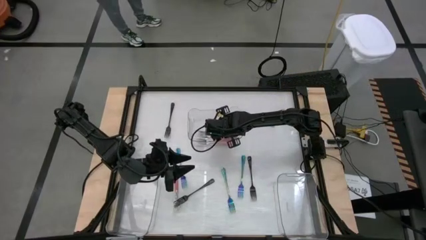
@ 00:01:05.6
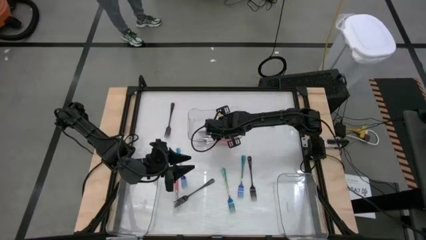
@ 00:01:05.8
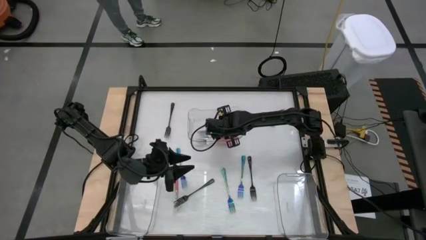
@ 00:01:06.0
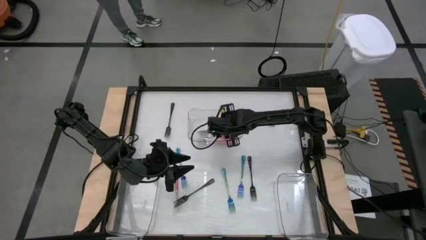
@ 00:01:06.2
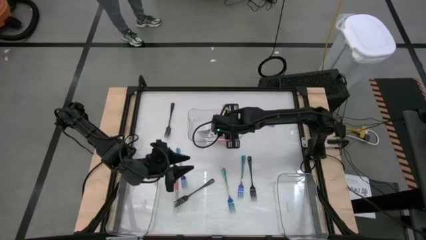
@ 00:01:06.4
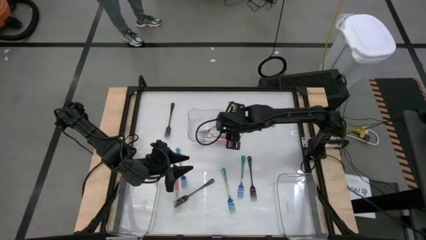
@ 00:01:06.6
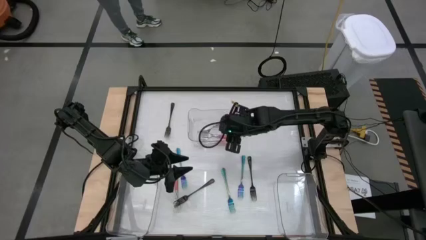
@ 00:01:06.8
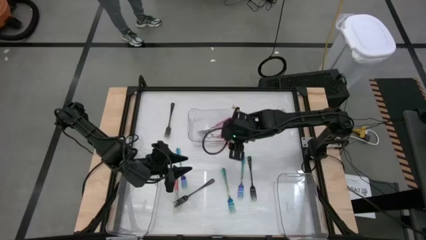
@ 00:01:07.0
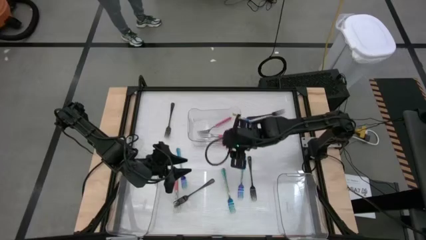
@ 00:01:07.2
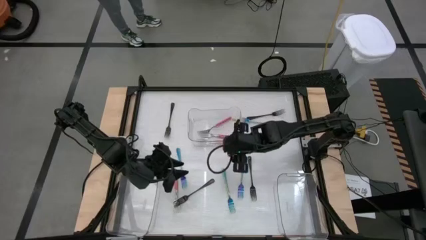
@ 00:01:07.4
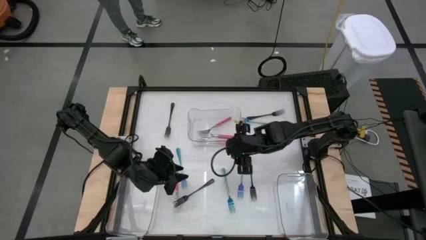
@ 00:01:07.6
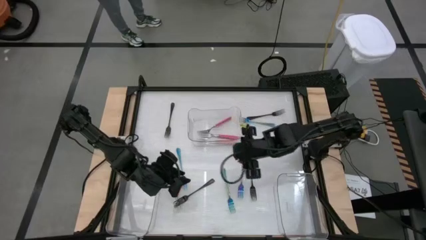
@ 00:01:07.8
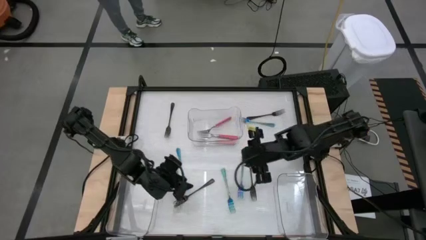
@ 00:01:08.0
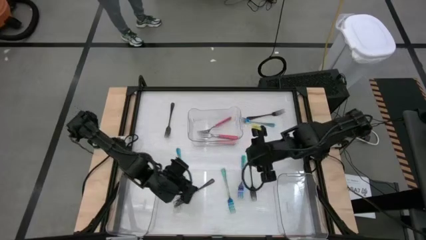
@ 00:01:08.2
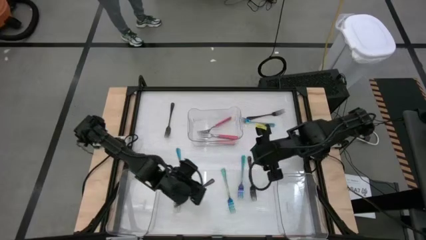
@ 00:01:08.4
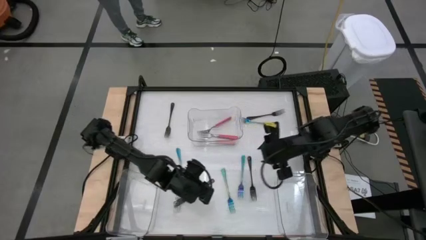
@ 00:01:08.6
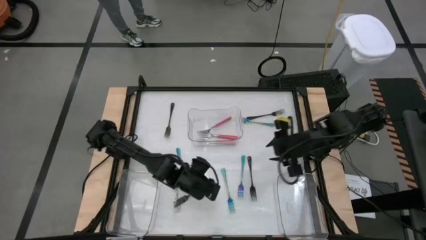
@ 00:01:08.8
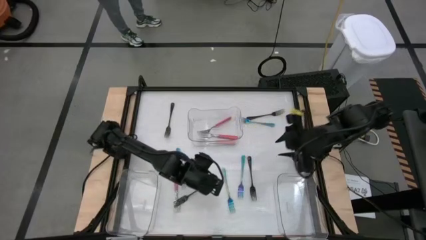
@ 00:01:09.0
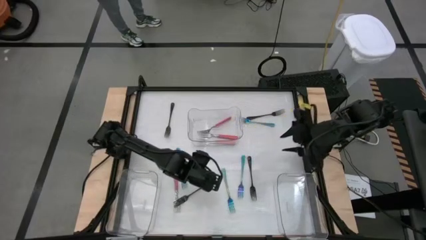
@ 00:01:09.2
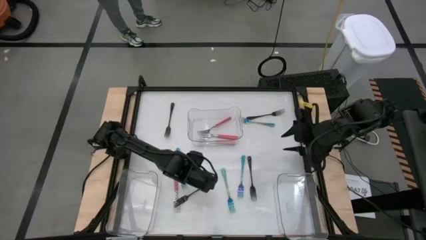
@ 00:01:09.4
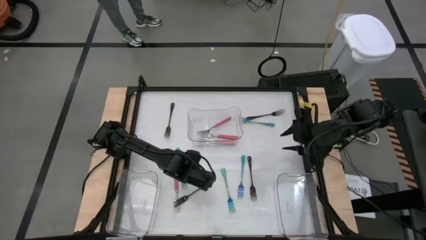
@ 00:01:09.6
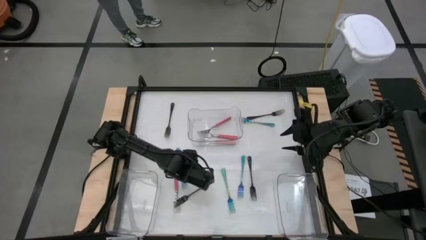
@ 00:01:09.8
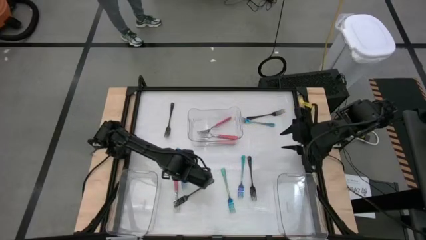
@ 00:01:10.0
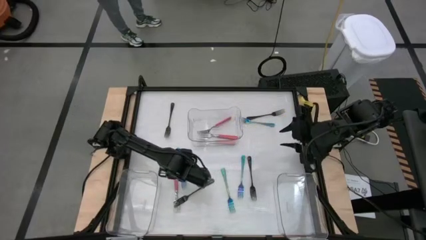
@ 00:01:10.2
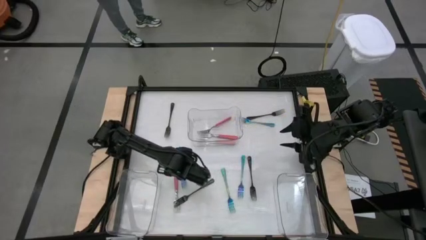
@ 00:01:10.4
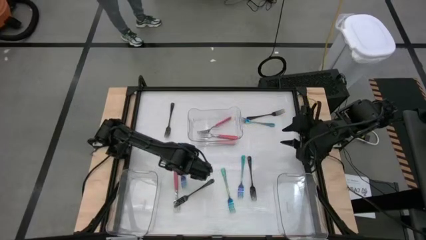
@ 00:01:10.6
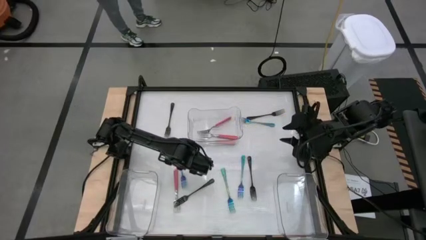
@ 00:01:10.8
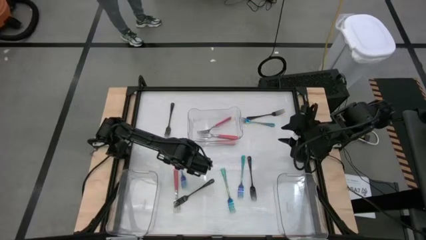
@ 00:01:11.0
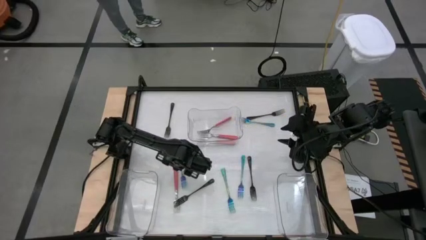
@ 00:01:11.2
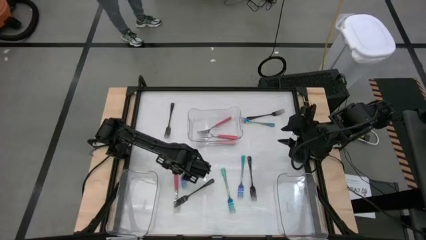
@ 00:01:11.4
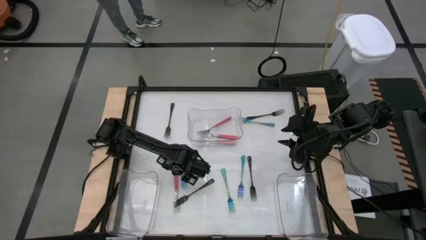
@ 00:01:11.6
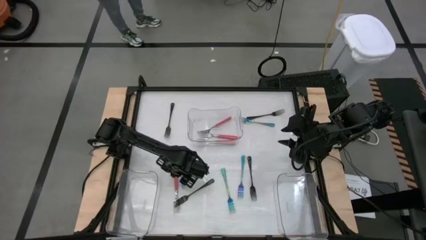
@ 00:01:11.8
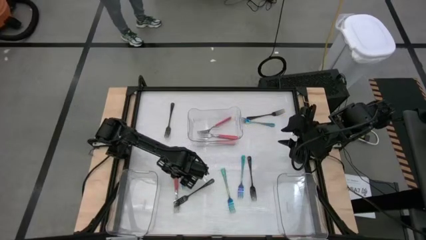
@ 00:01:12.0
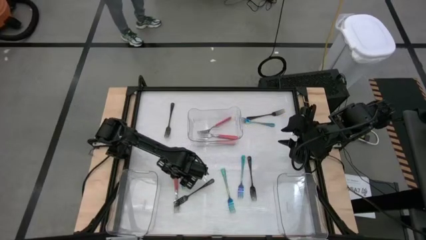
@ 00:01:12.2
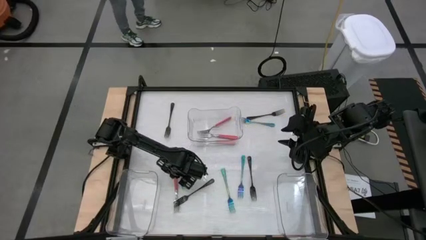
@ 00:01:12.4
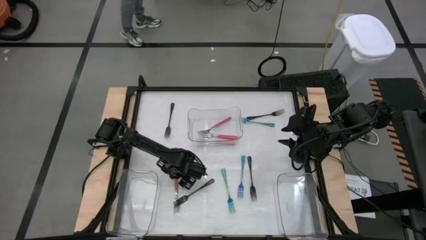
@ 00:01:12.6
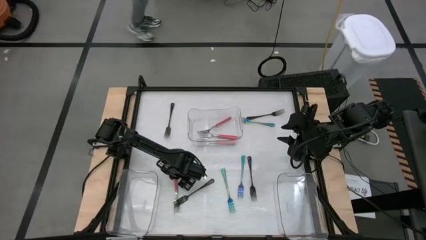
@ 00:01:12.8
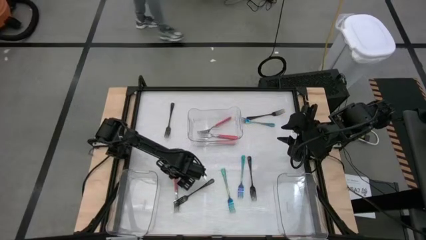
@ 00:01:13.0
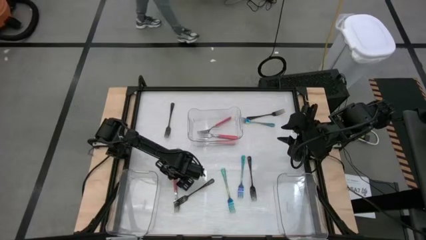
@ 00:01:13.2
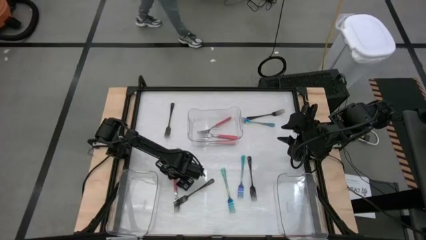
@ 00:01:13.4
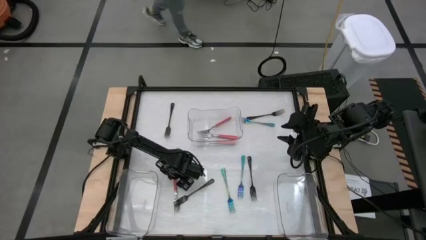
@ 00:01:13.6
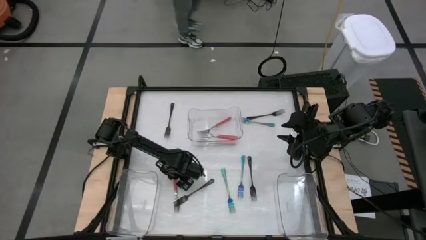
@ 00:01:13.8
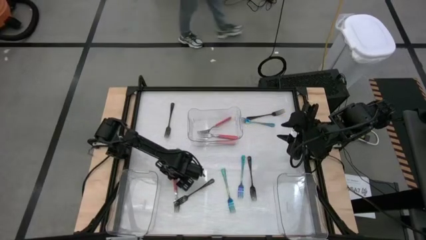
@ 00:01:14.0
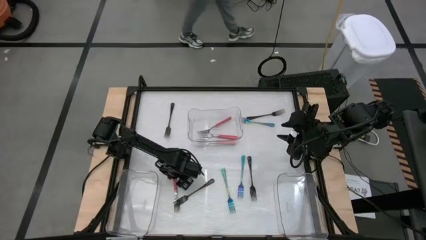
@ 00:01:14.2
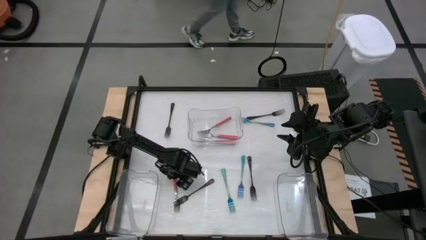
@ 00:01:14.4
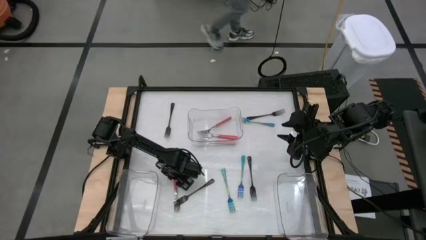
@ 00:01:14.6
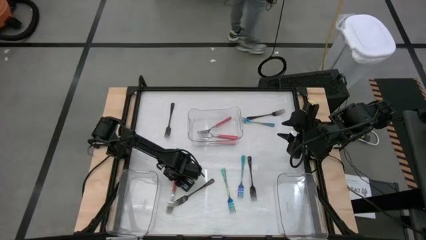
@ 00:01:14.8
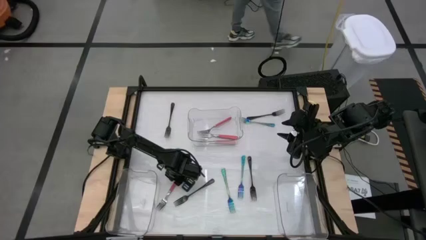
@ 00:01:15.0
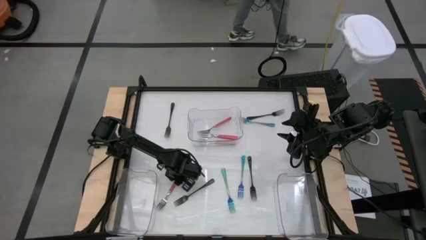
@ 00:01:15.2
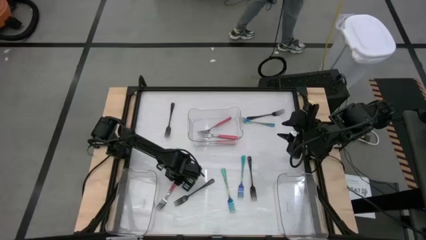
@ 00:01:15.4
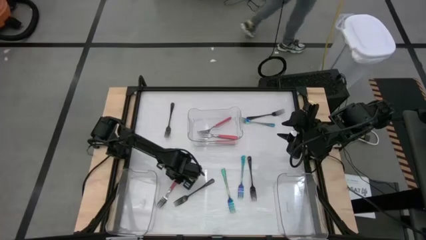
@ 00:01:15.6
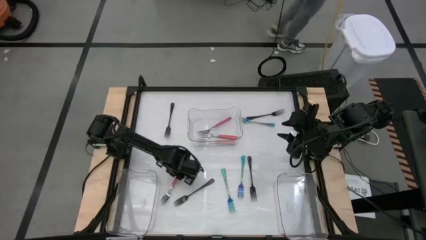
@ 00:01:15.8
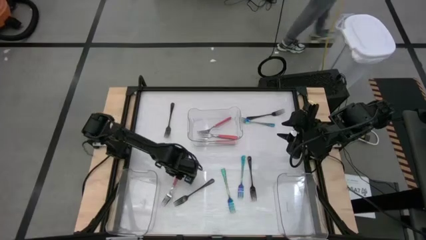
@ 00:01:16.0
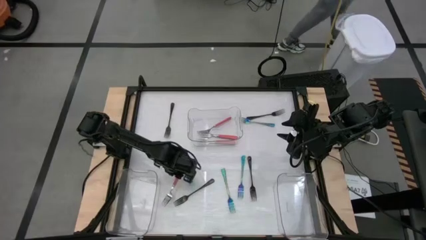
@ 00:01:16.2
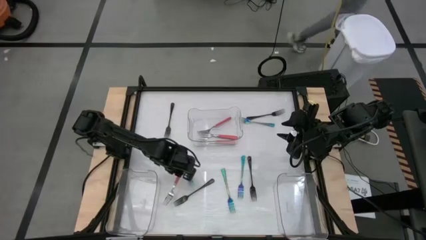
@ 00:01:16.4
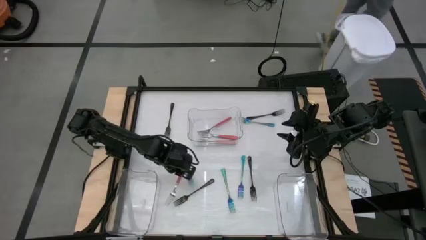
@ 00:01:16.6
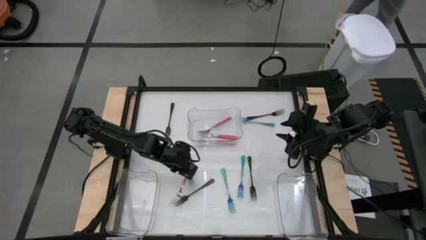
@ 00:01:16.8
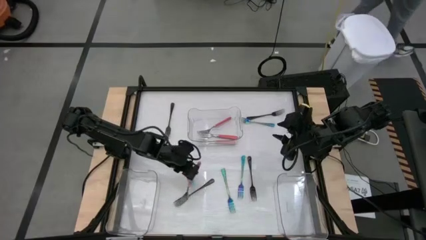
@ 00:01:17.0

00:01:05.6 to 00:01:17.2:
Task: Sort silverware by color (type)
Put the pink fork into the middle transparent bin
